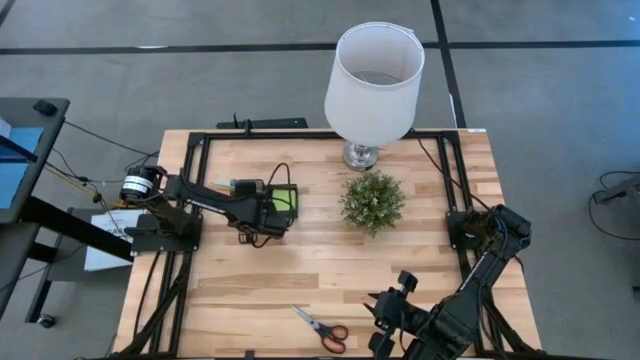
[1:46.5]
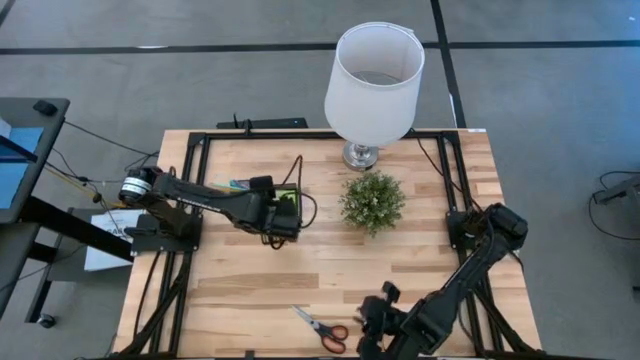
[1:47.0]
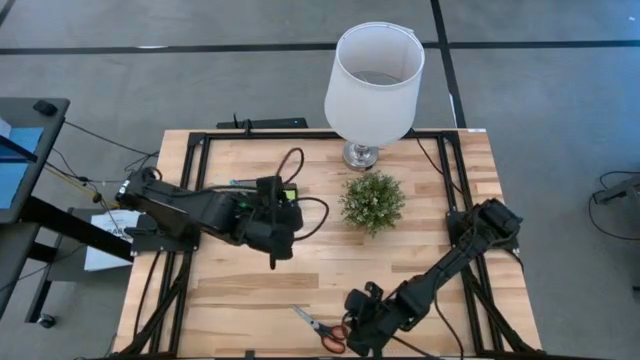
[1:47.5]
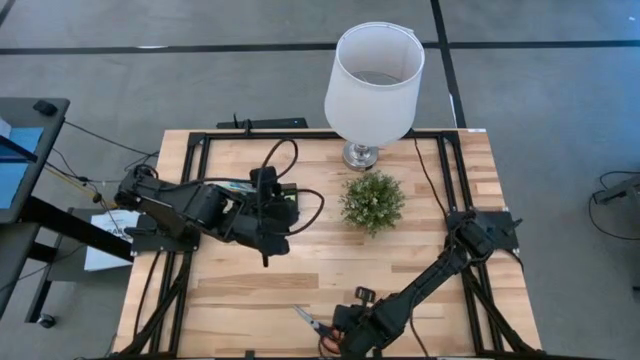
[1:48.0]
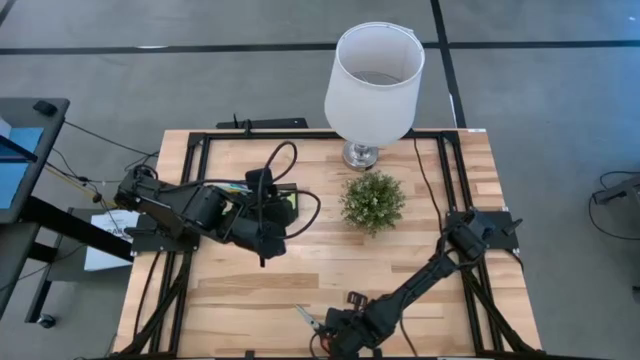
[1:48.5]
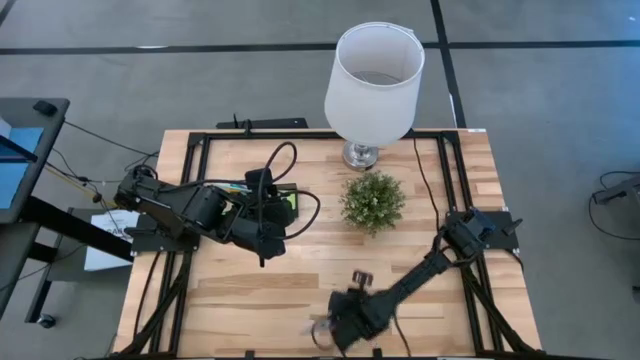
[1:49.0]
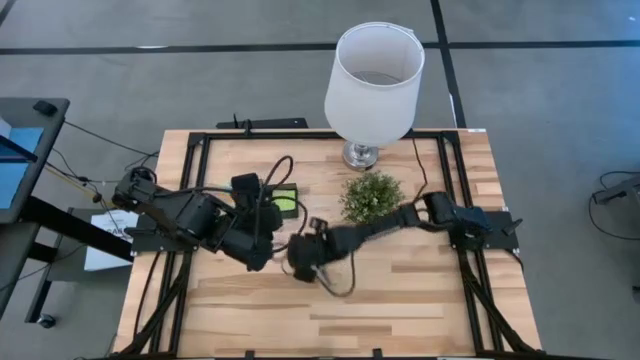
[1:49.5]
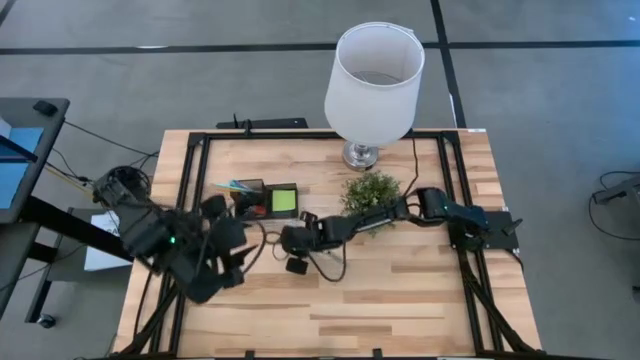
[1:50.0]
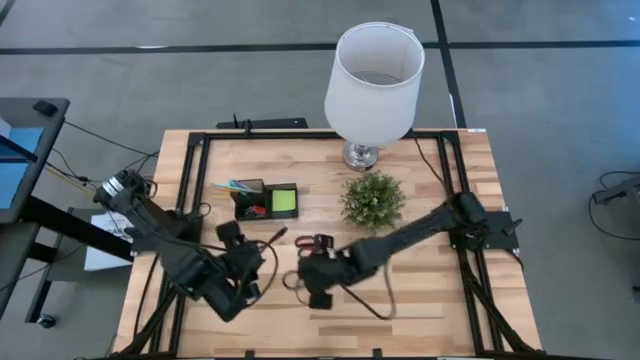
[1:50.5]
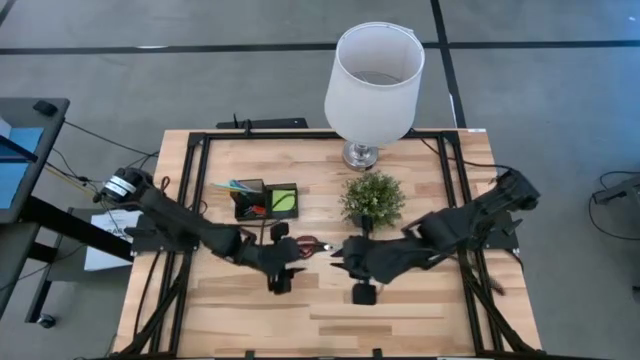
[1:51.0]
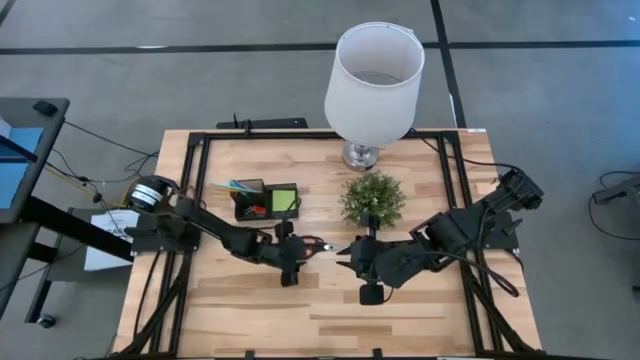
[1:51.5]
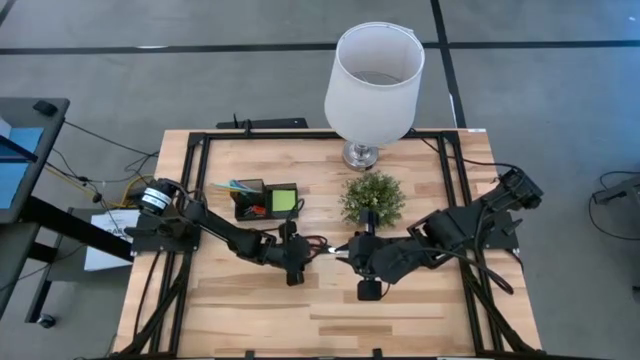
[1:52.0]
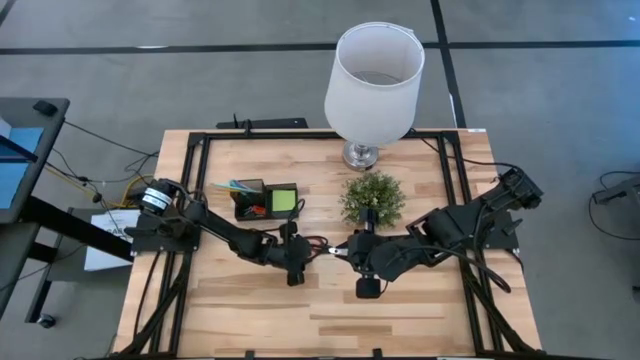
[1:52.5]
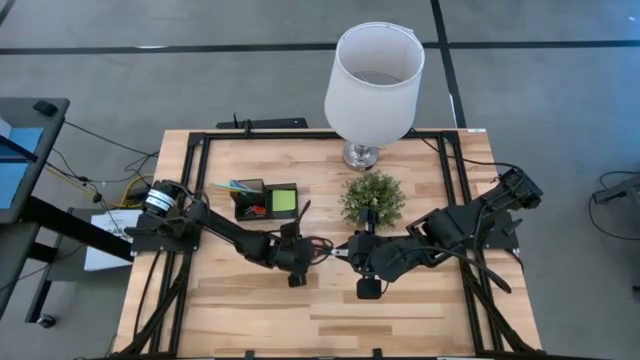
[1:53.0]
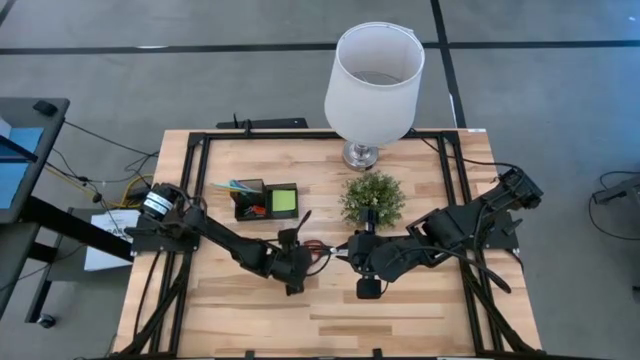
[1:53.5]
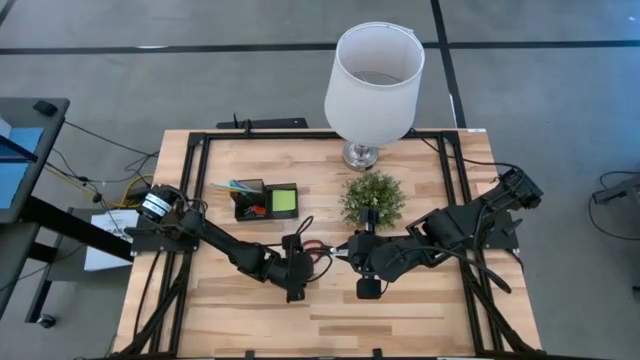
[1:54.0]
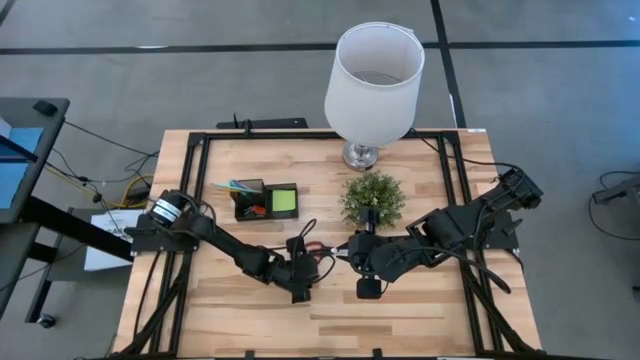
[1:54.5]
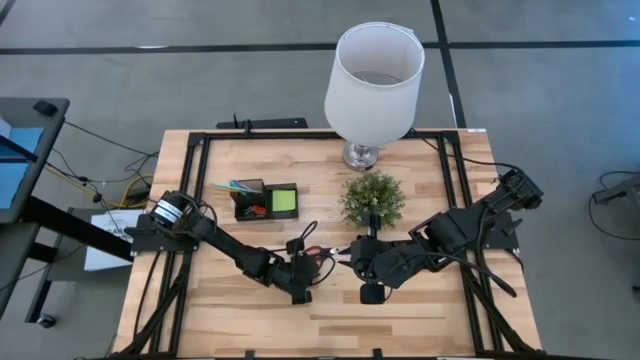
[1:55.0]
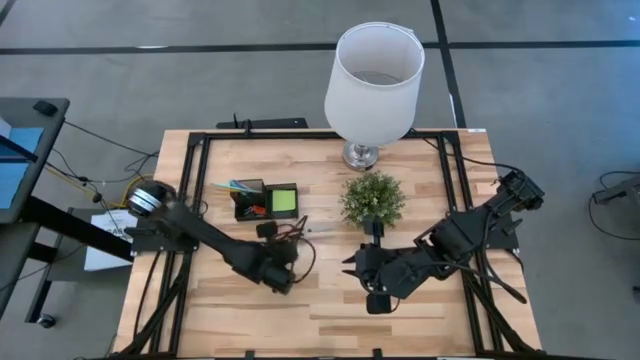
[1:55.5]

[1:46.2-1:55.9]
Task: Pick and place office supplies into organizer
Put the black scissors into the black desk organizer

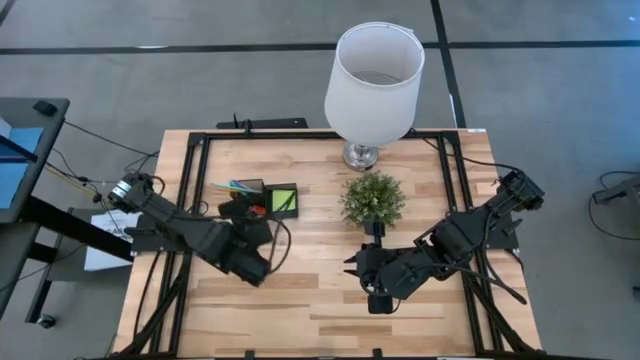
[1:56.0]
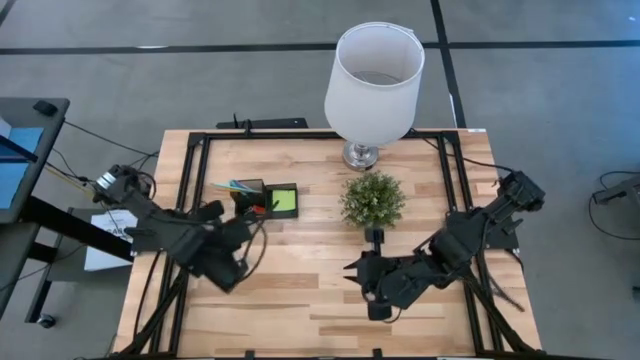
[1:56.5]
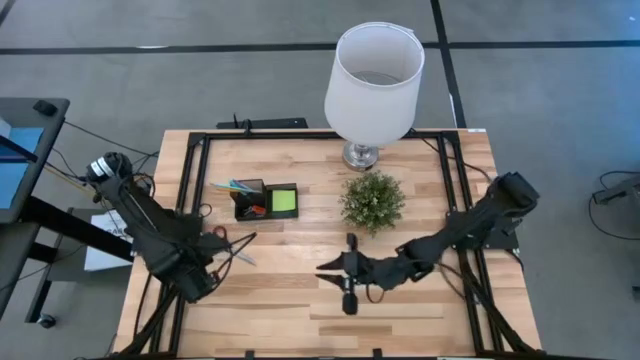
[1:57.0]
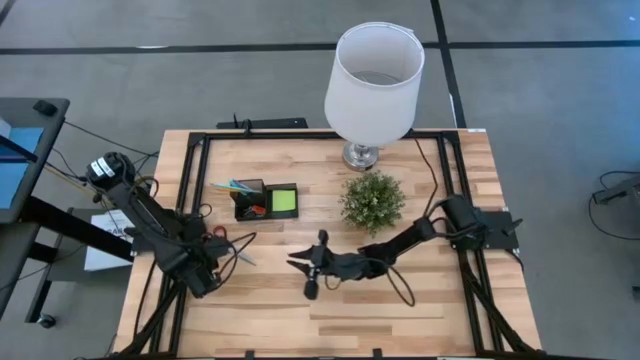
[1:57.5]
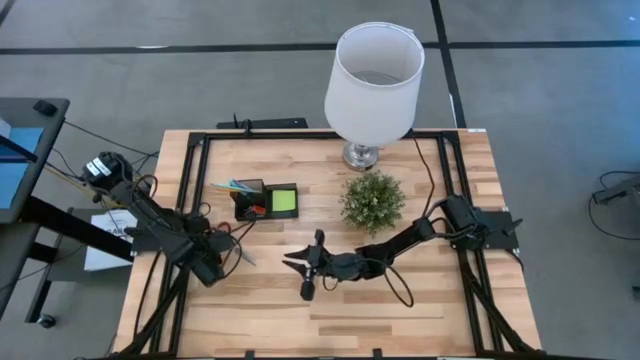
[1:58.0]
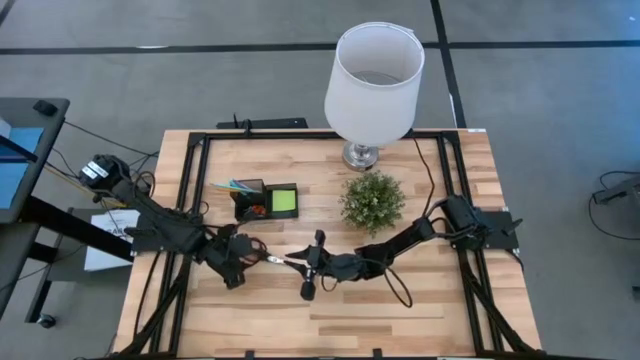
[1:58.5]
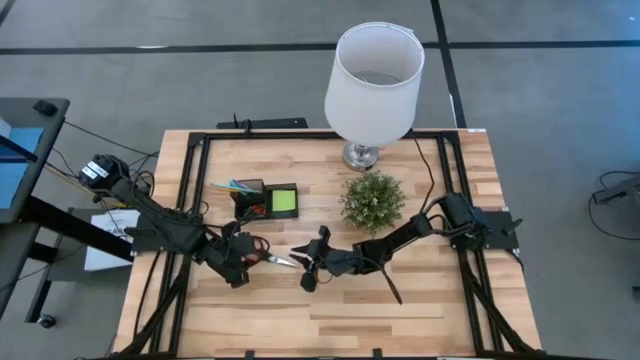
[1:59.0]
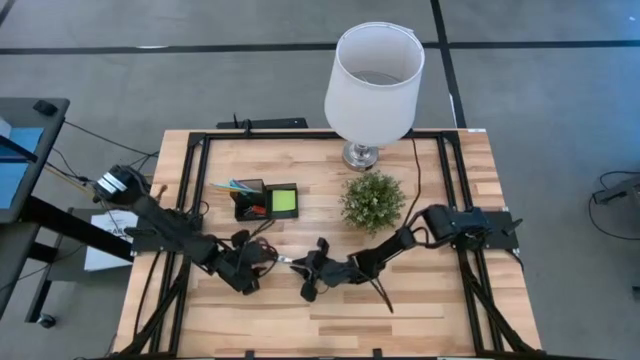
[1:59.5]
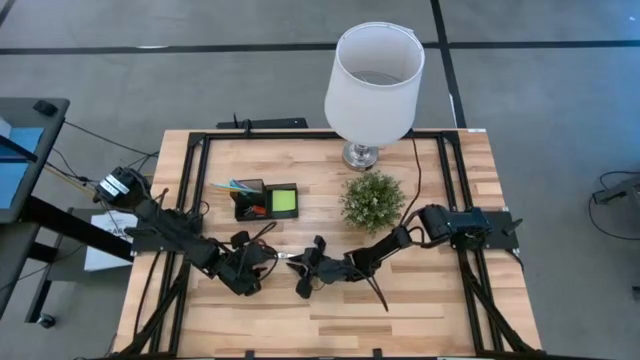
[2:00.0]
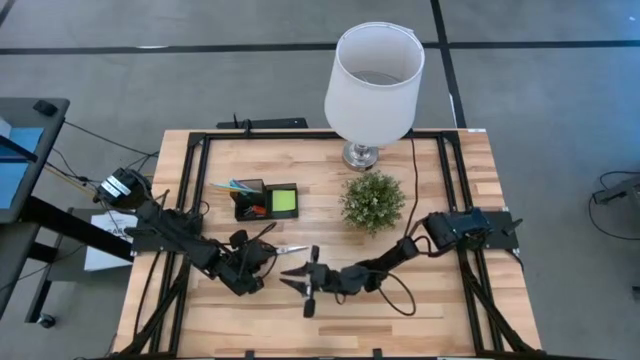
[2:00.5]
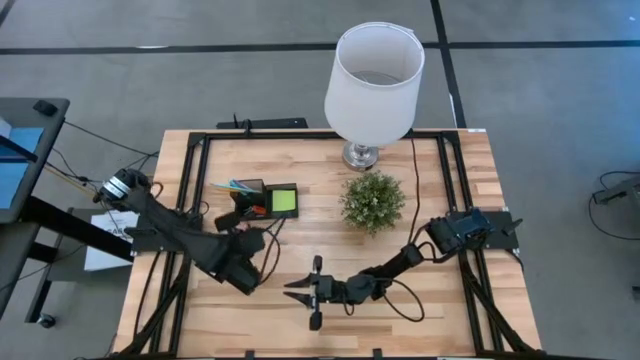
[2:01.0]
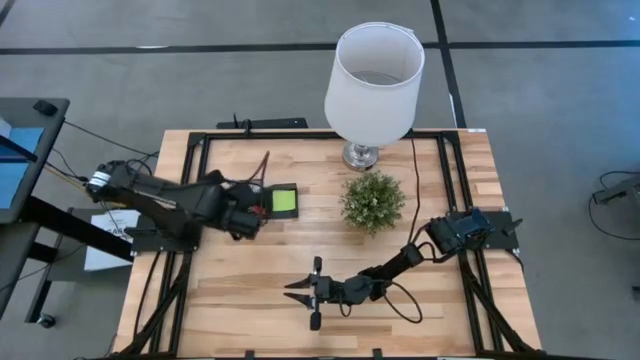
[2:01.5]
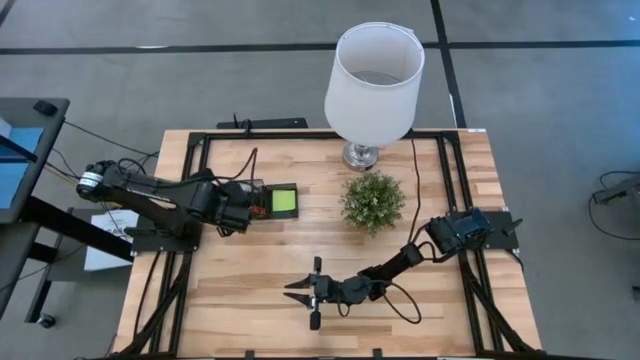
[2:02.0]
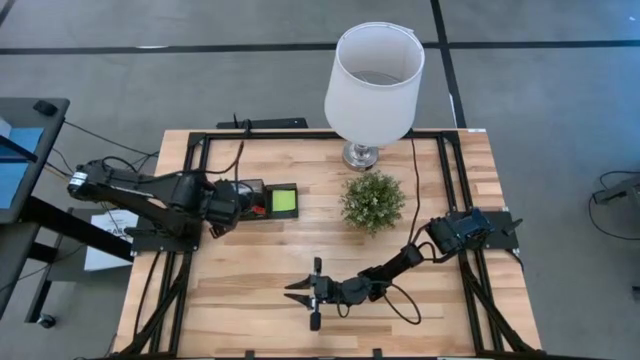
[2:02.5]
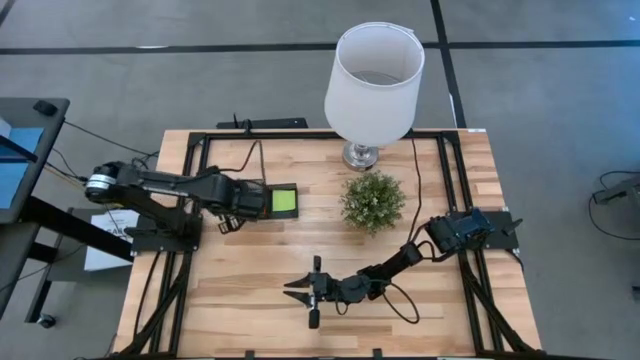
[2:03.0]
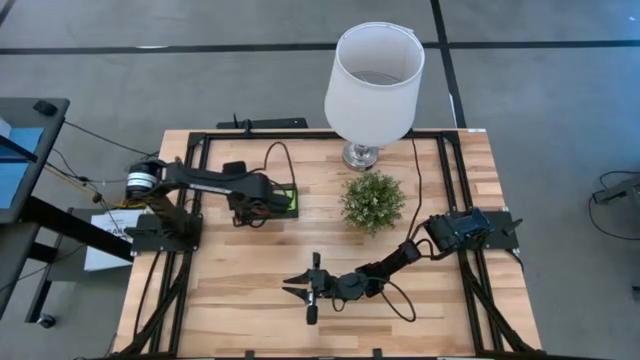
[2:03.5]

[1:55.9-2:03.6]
Put the black scissors into the black desk organizer

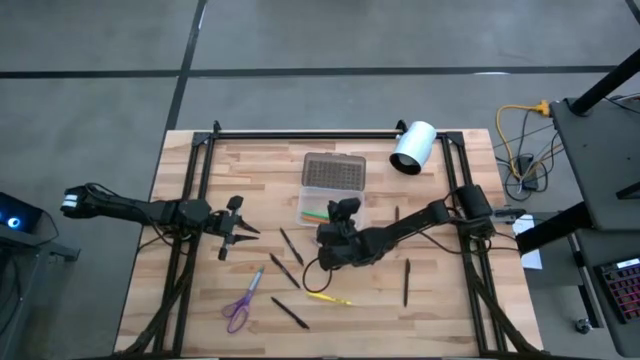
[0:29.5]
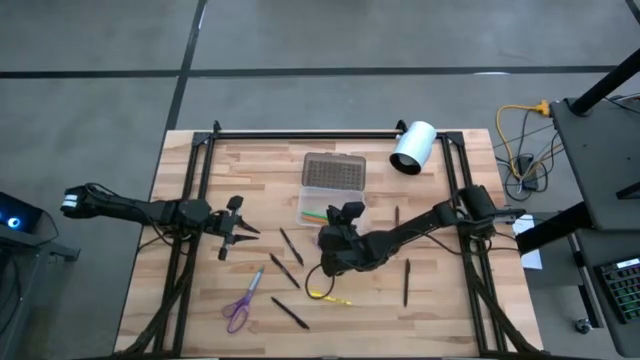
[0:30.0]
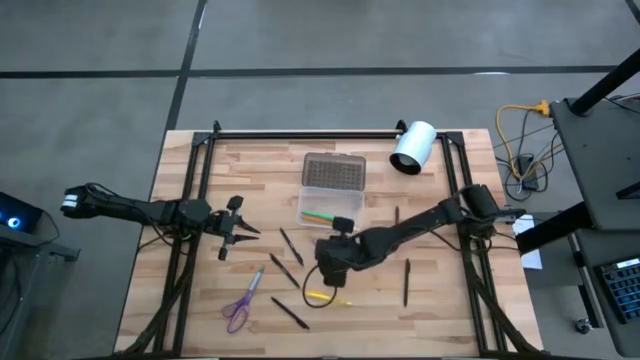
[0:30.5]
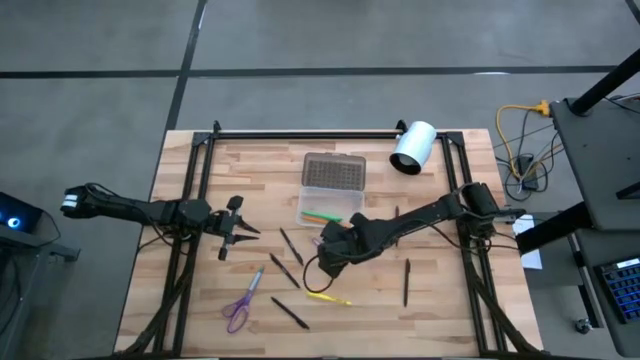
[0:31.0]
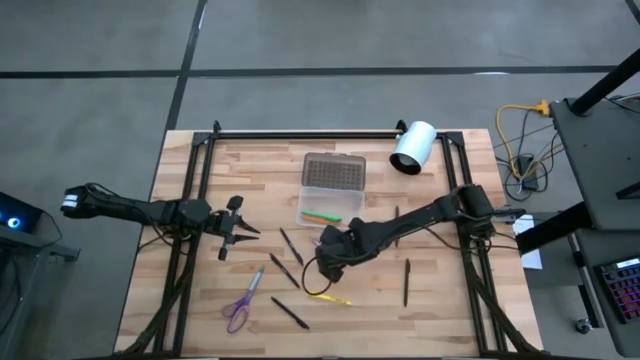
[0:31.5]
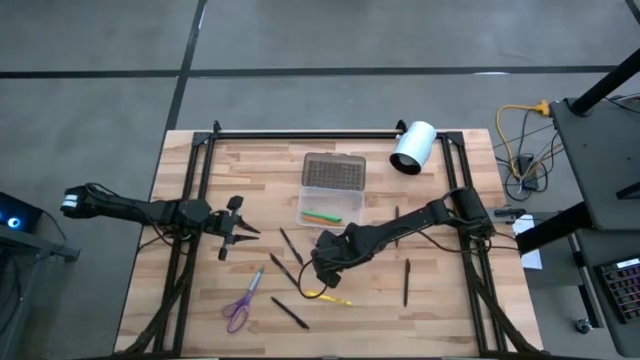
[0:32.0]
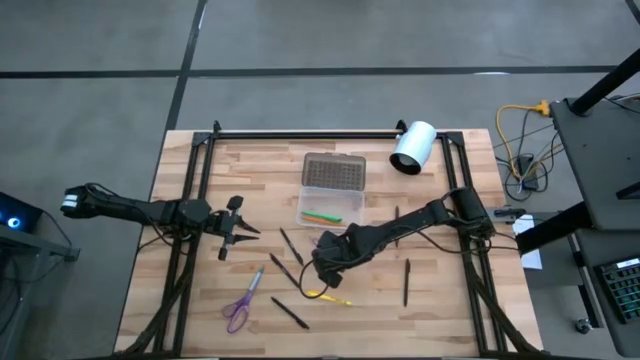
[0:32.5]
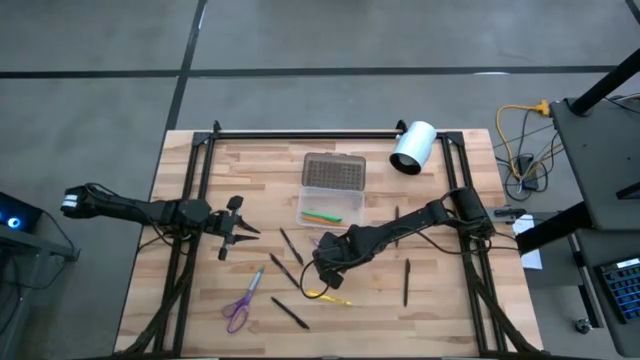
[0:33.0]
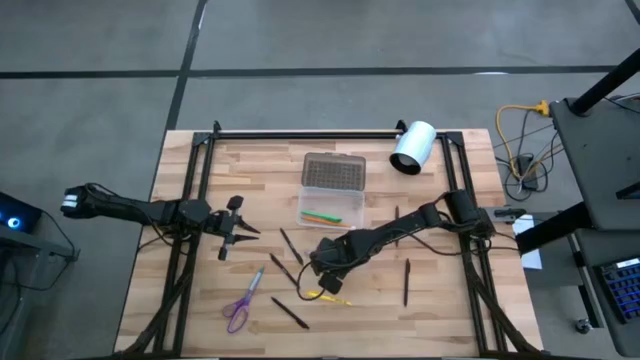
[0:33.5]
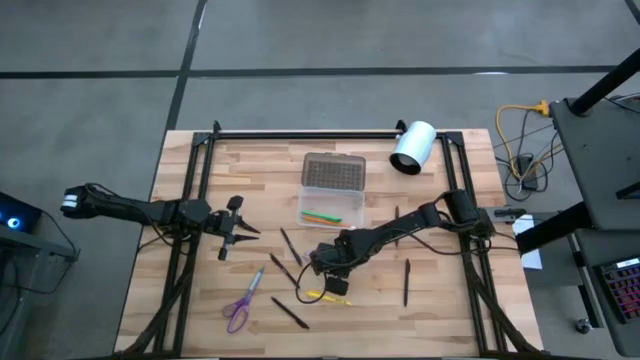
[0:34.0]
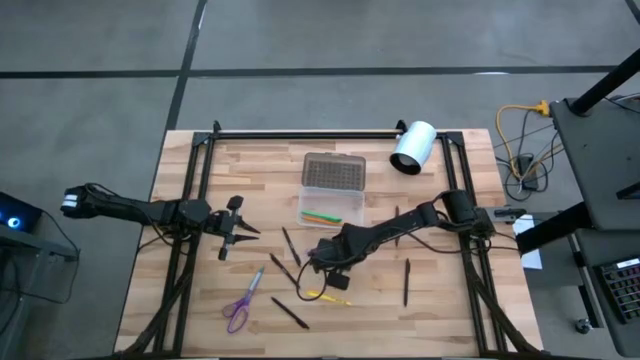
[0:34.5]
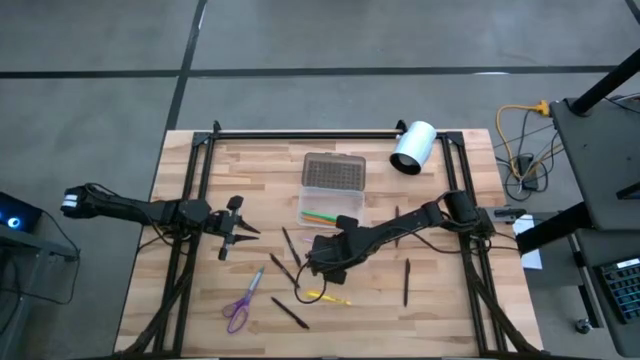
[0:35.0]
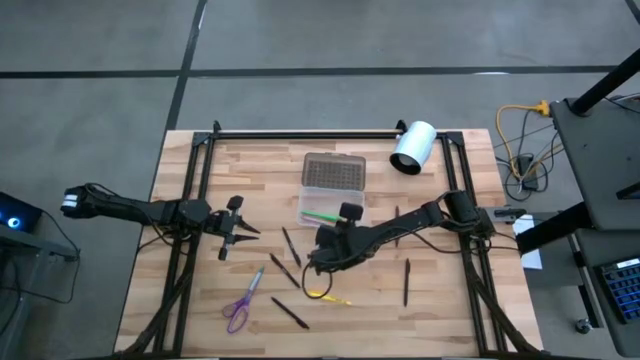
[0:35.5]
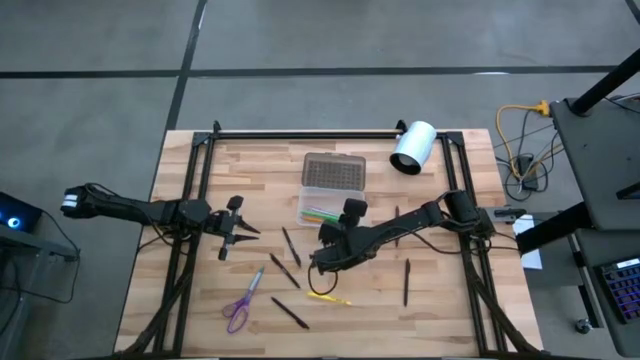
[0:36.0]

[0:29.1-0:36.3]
Task: Pick & place school supplies into a supply box
Put the violet pen into the black supply box
